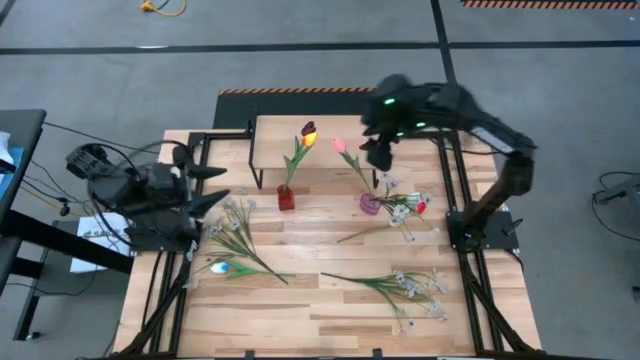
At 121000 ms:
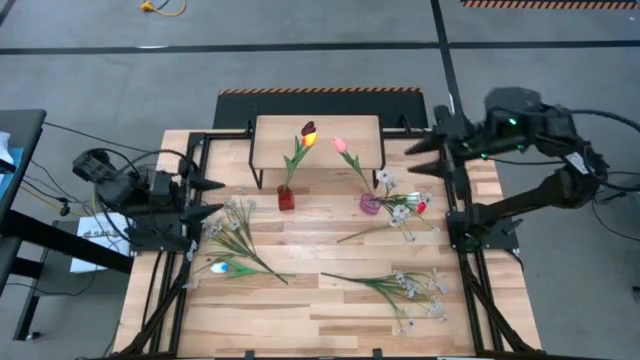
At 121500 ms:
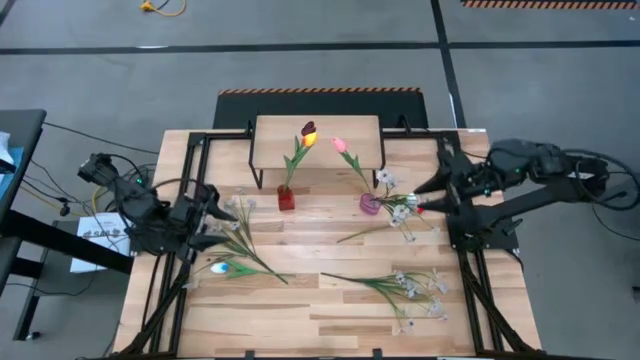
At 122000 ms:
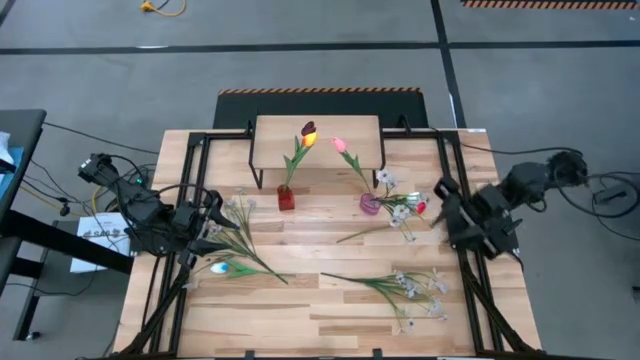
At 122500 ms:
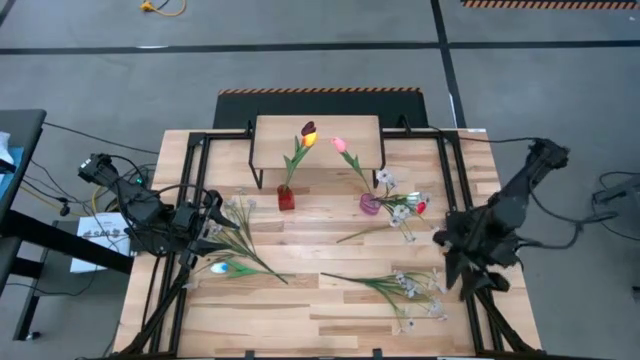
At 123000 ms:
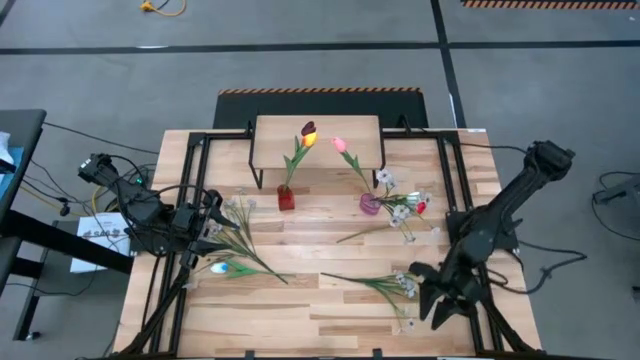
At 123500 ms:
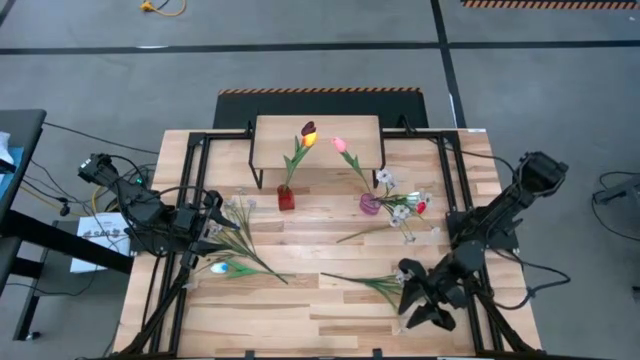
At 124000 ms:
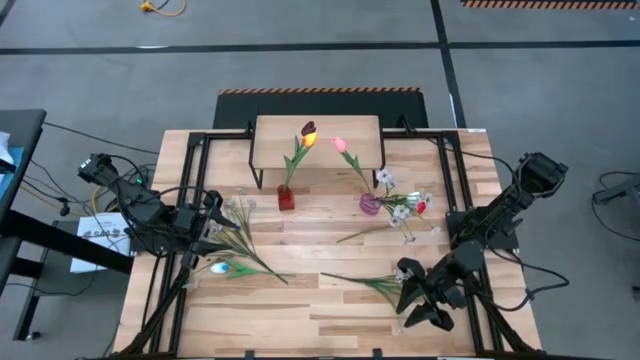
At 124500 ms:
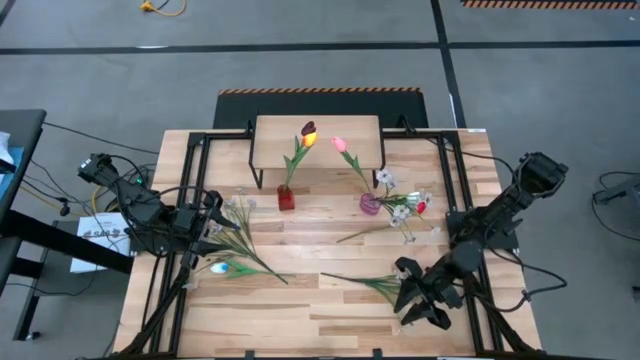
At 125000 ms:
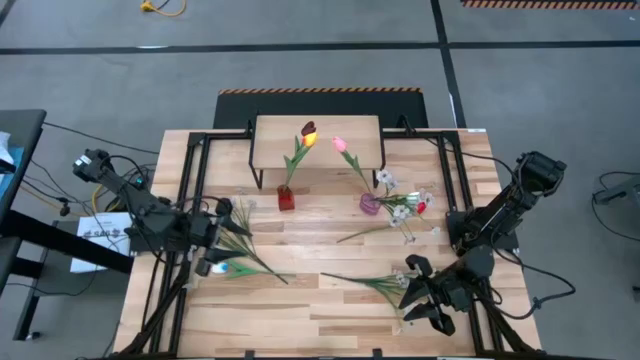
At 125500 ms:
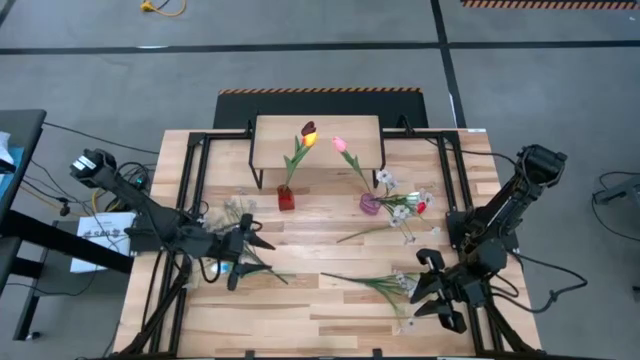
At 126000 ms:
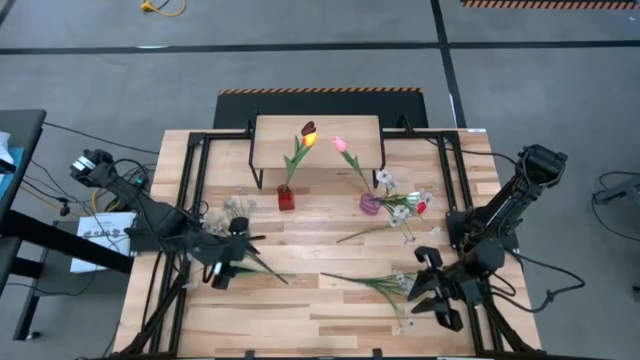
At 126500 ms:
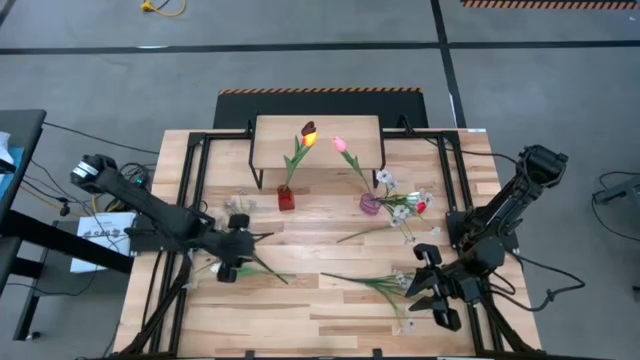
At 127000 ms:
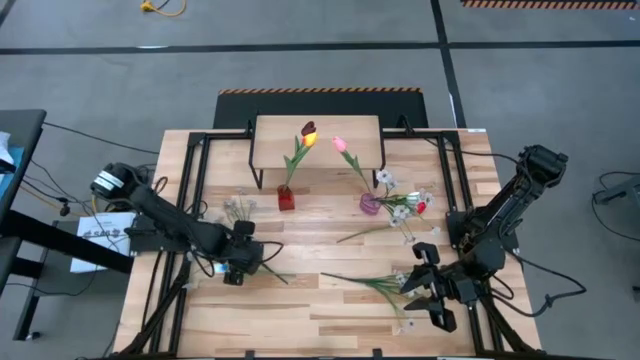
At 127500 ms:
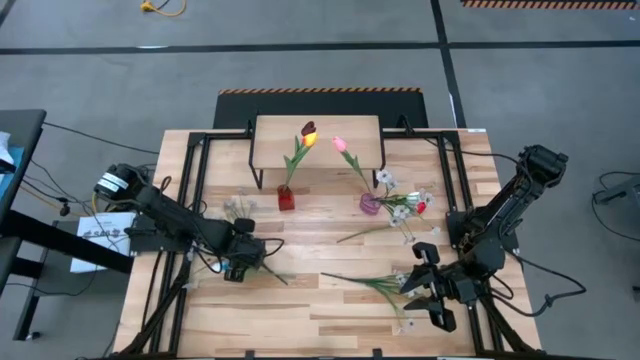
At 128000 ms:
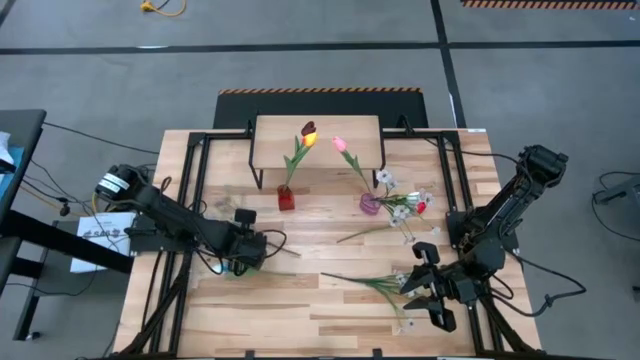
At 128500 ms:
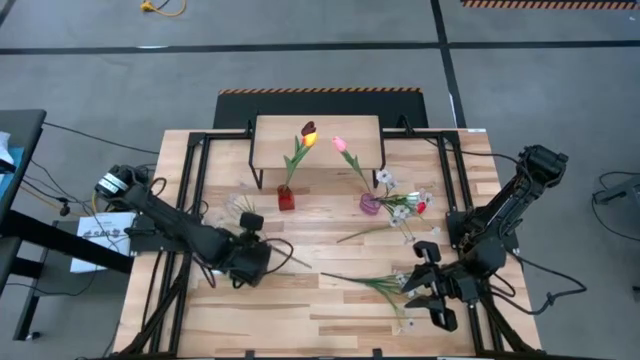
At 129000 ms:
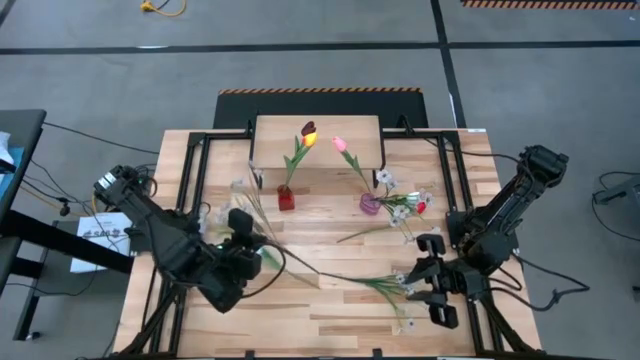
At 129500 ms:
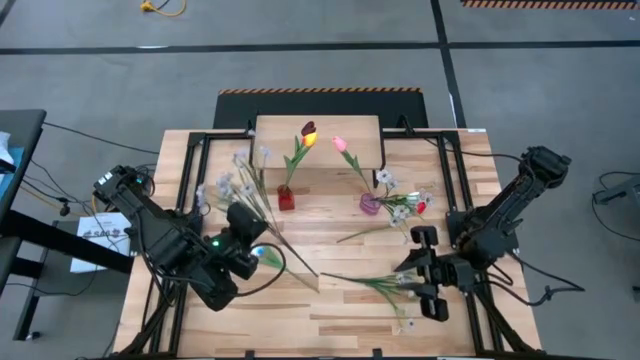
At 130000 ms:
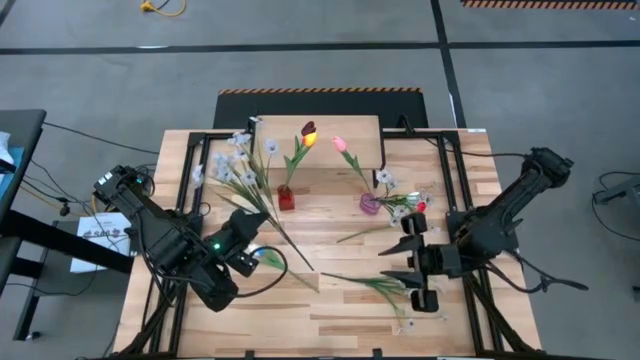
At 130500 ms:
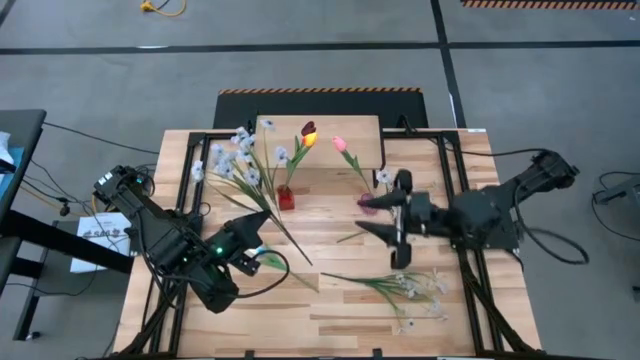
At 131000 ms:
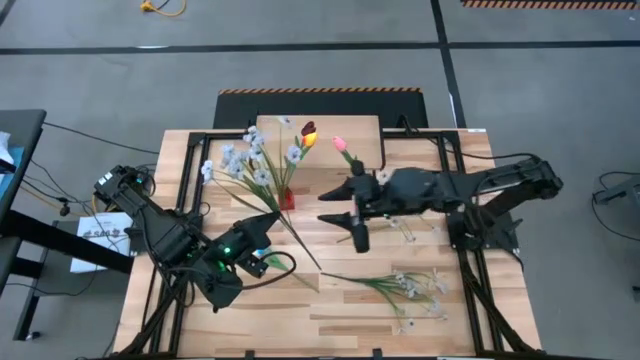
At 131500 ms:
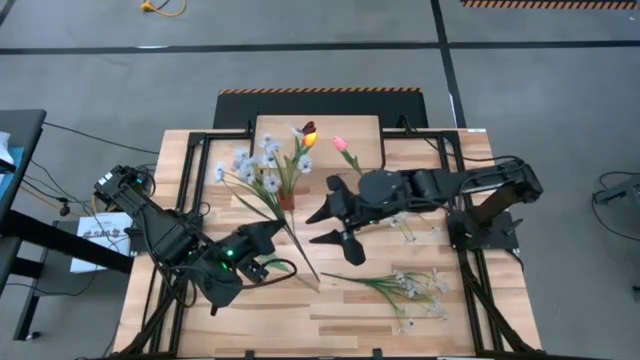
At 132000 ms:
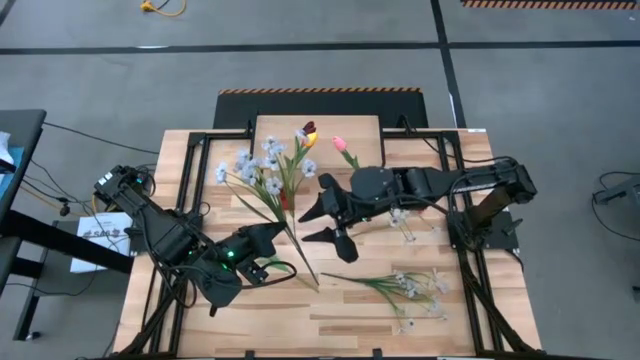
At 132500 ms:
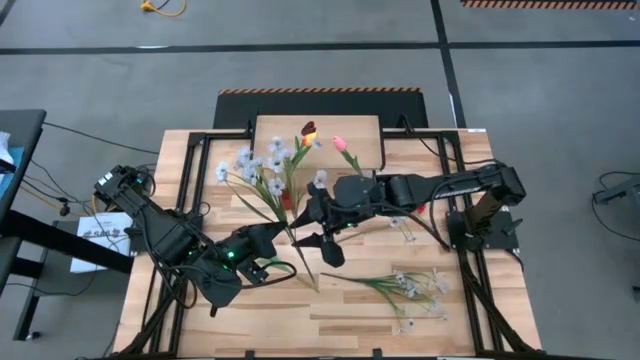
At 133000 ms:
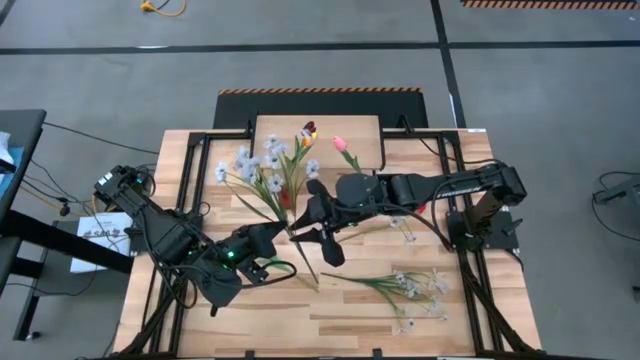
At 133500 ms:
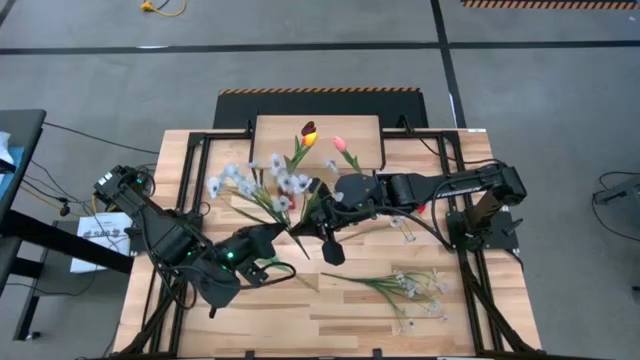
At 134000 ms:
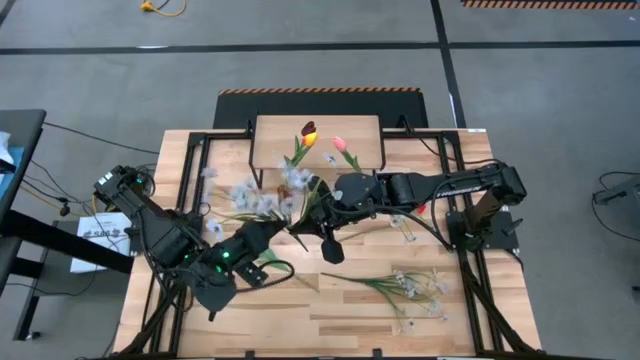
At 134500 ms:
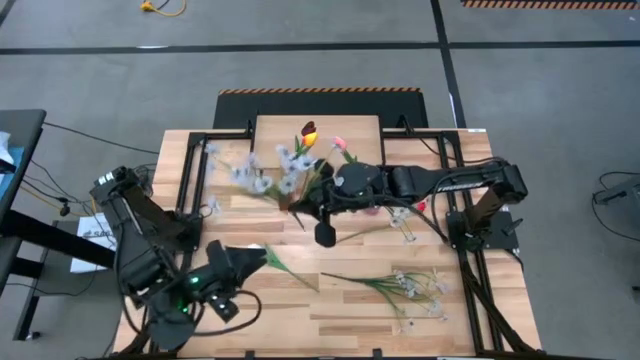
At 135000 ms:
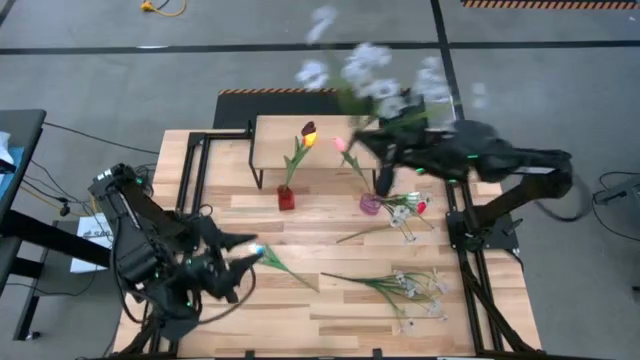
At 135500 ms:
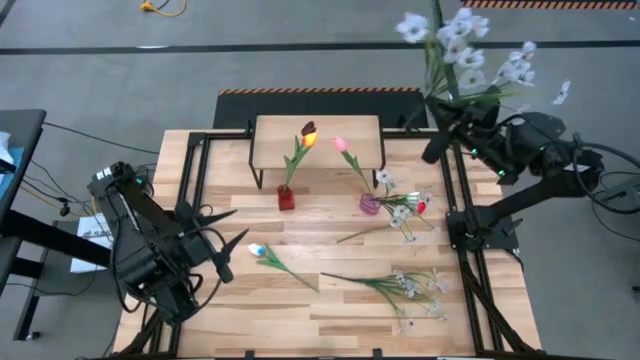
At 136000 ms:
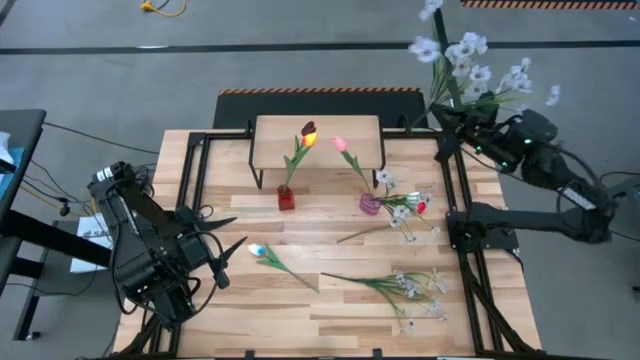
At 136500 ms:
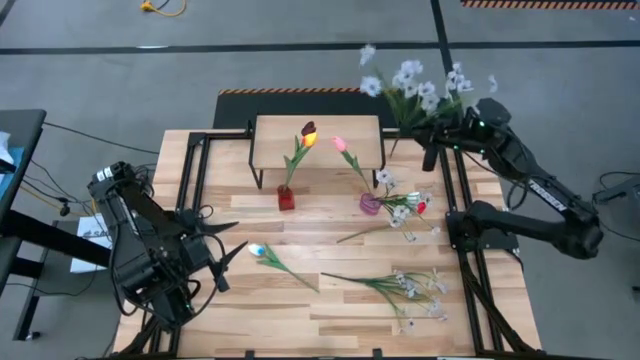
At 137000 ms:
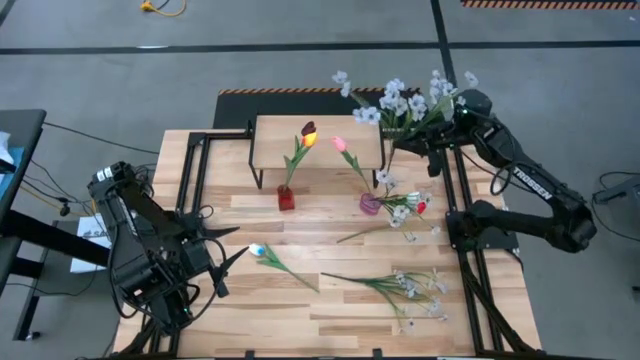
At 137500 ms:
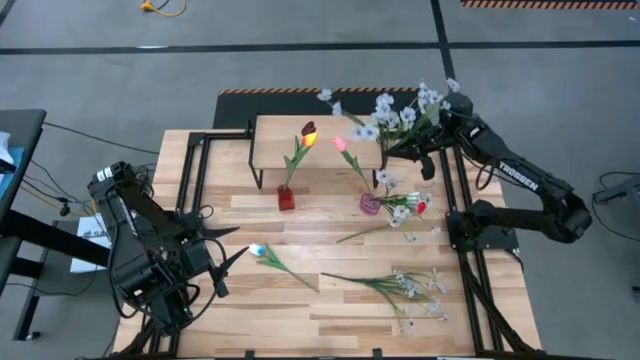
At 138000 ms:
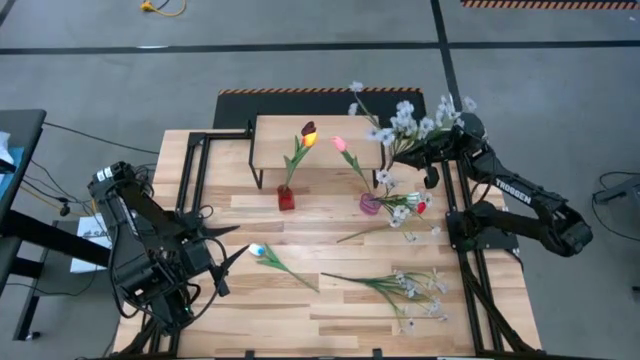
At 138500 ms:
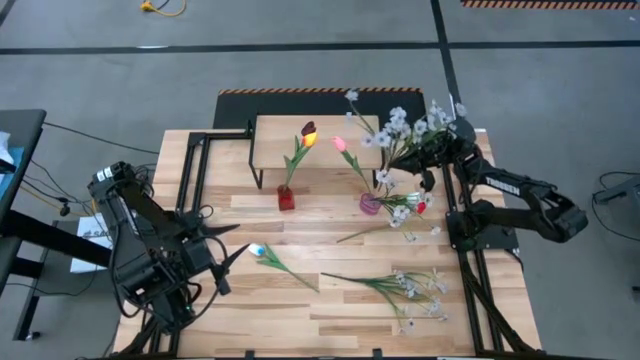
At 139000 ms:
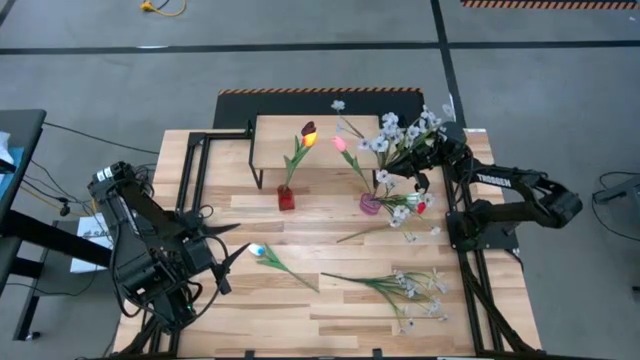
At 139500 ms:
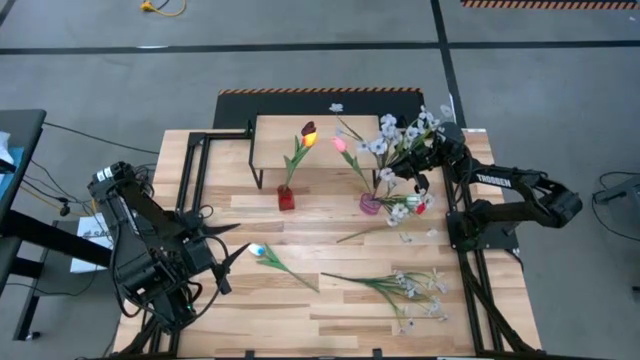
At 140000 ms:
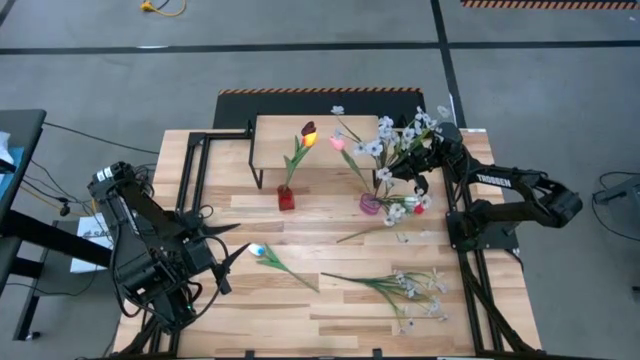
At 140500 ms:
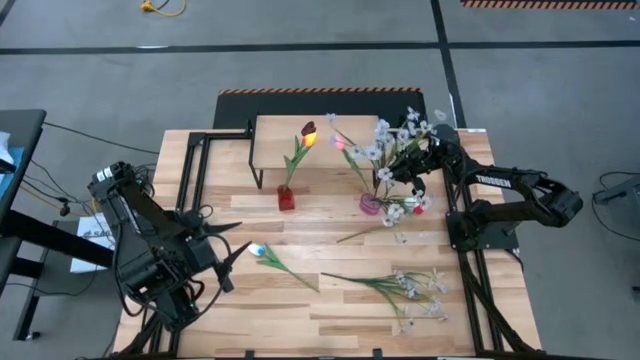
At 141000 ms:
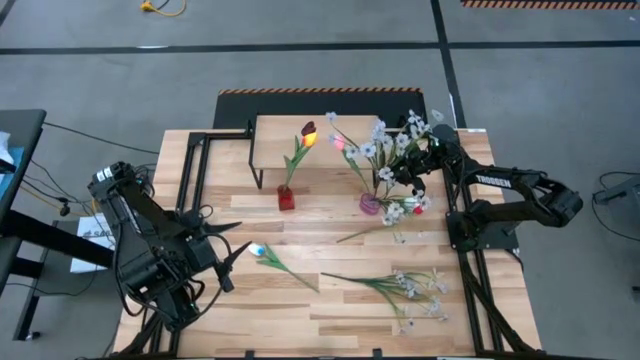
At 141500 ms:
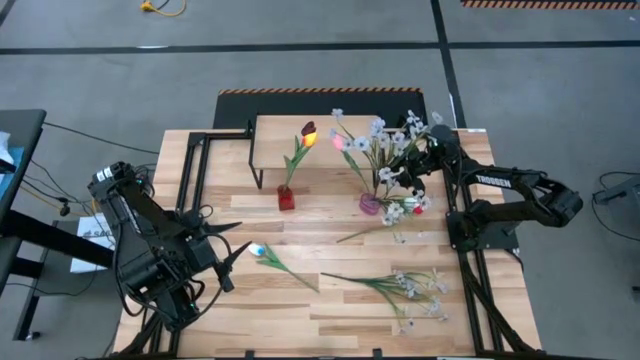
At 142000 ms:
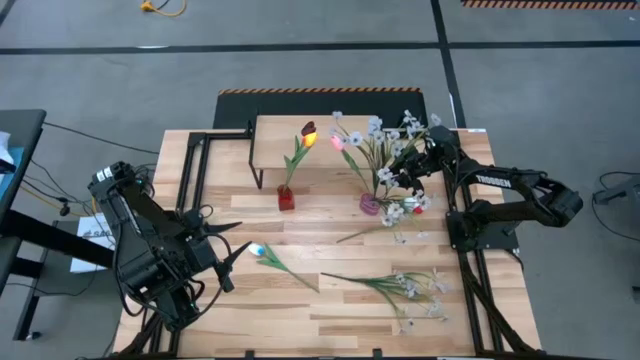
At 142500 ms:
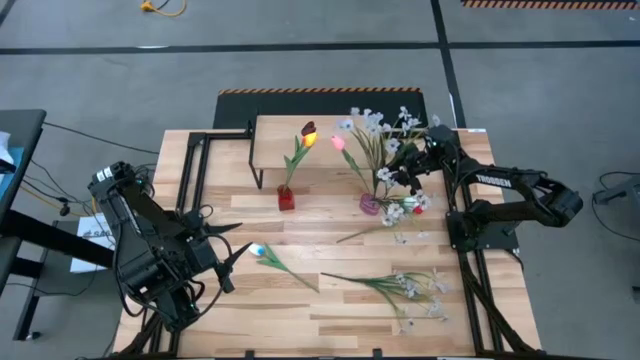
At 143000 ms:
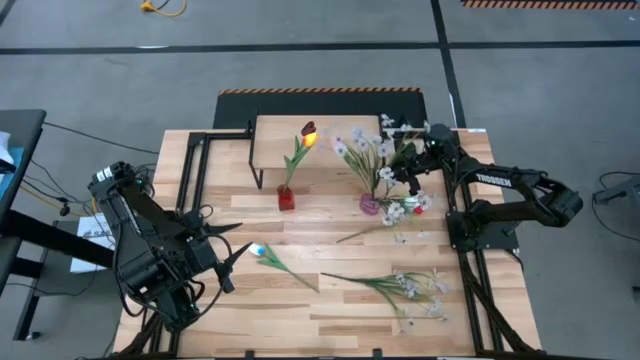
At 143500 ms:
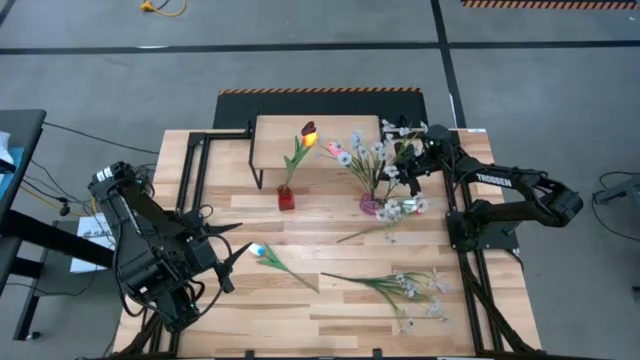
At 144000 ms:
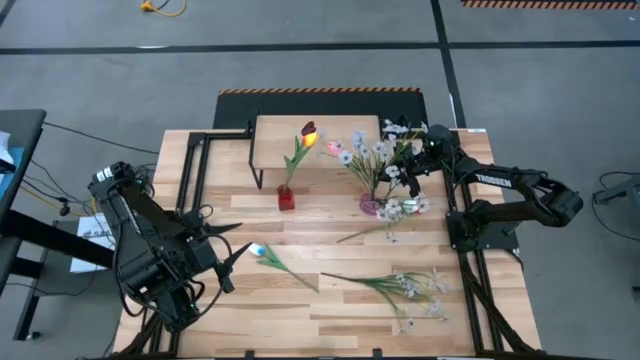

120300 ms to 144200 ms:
Task: Pick and place flowers into a vace then onto a shelf
Put the left white flowers into the pink vase
